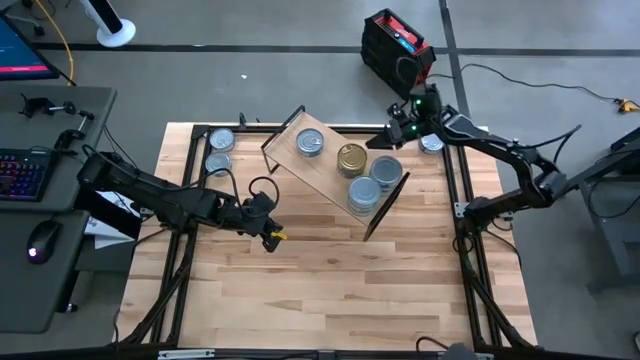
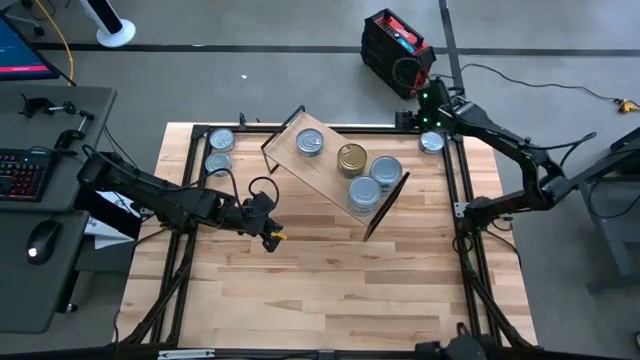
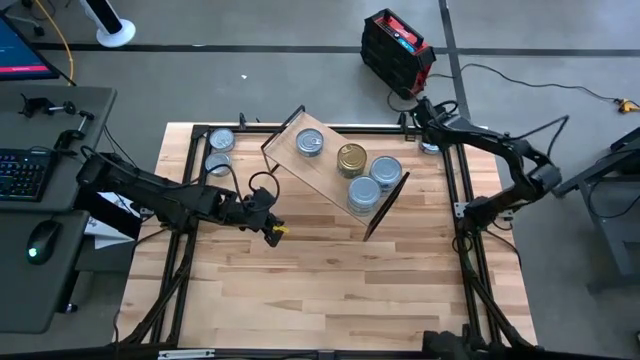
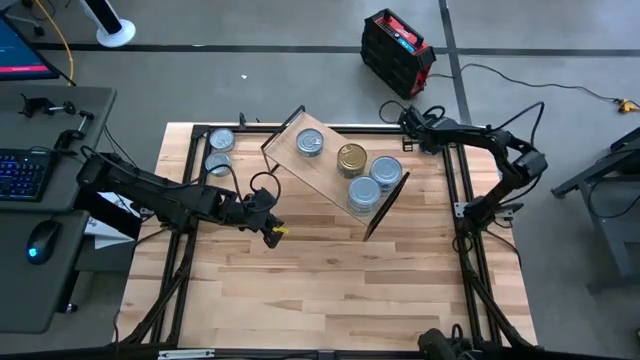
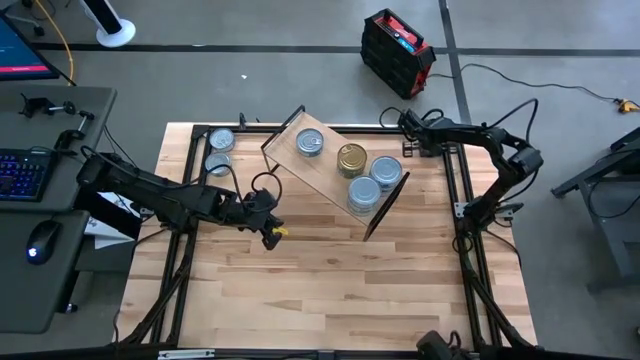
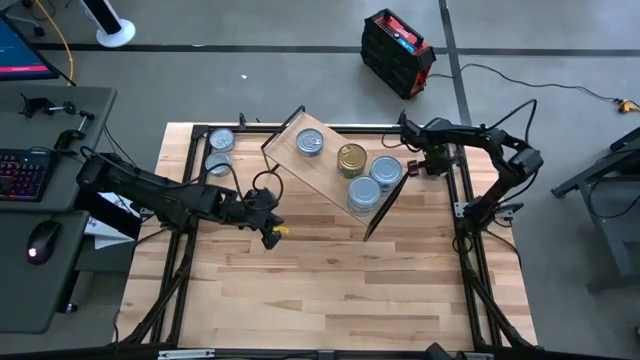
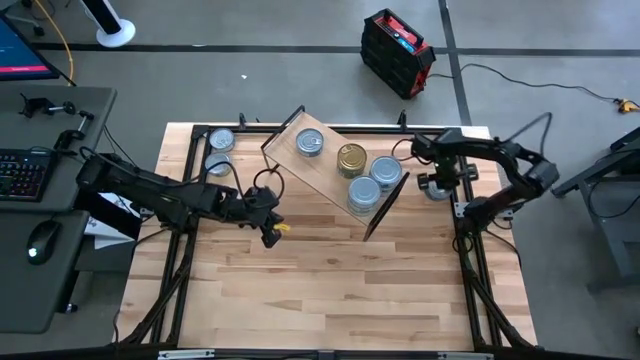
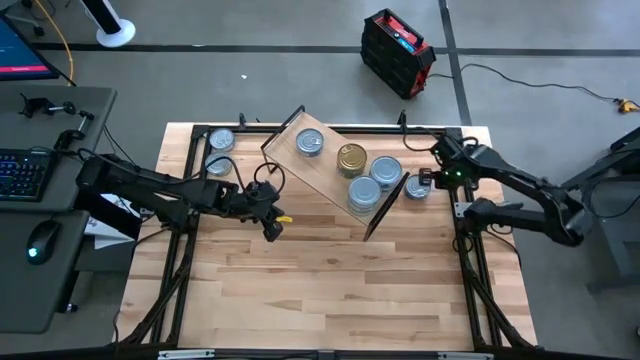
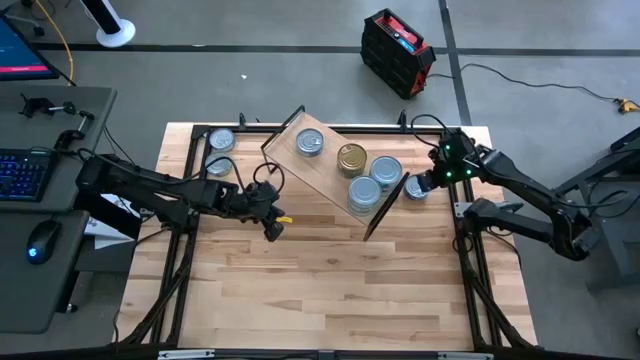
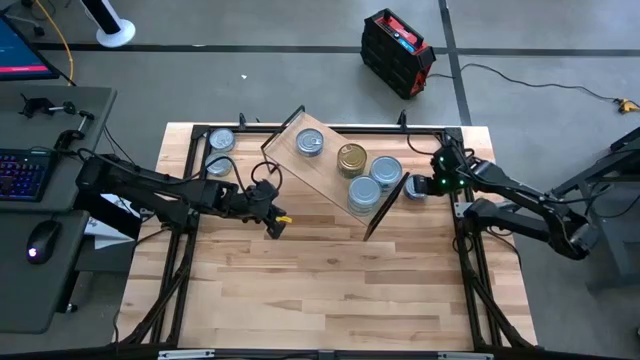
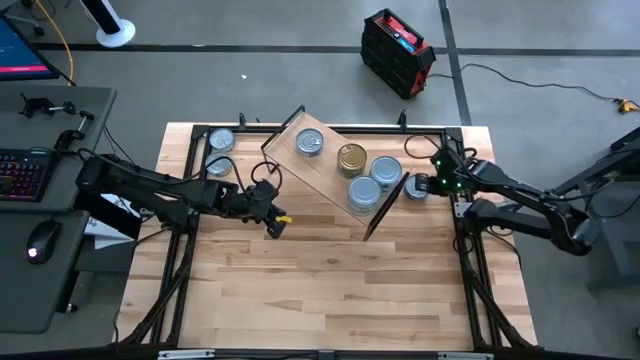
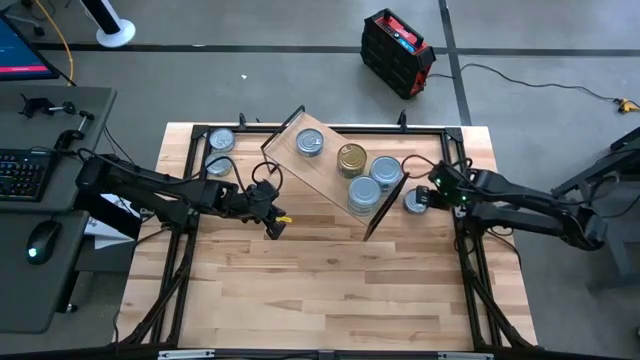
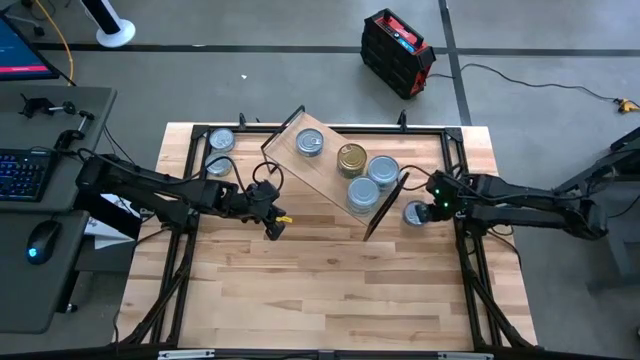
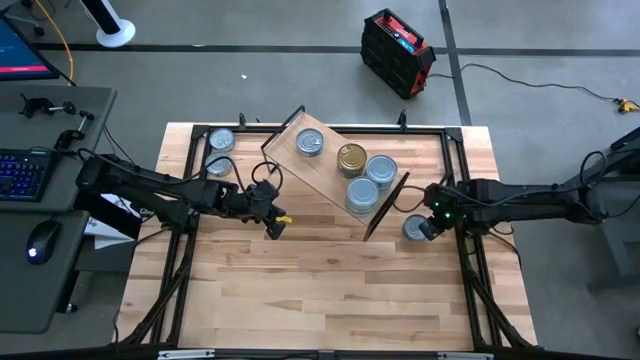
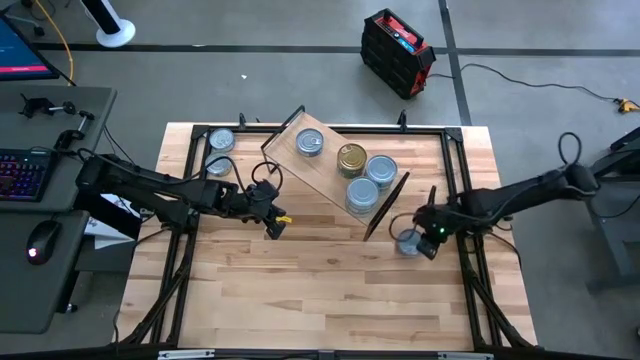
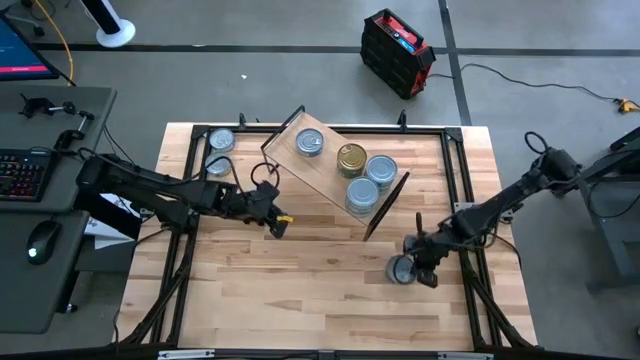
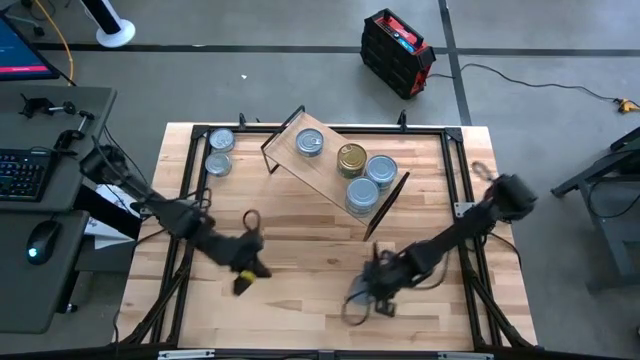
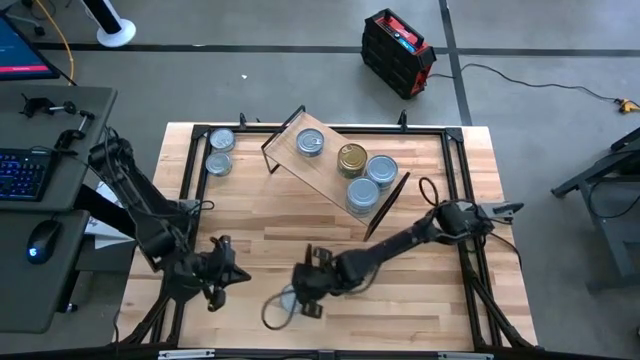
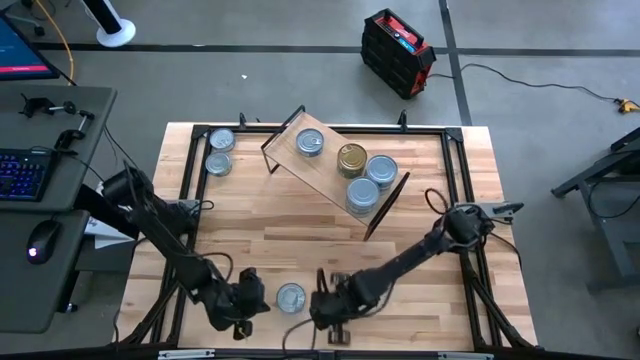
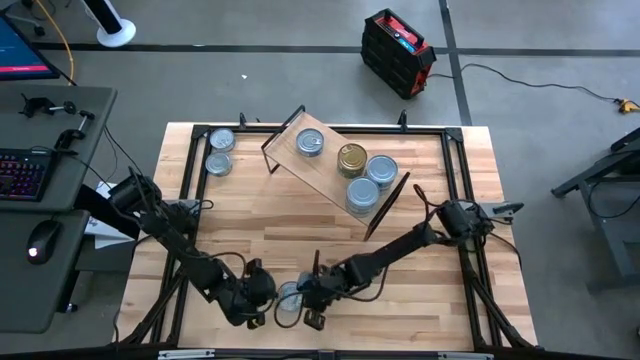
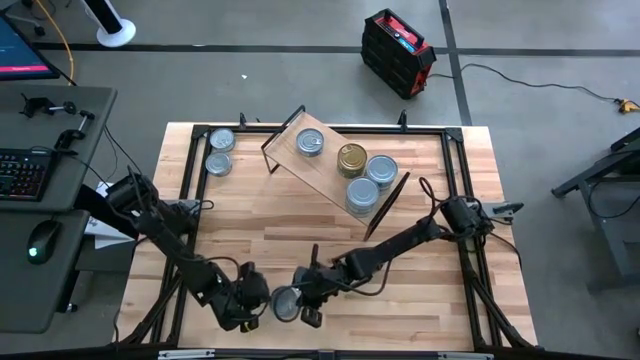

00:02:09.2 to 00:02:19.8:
Task: Stack canned seafood by type on shelf
Stack the blue tuna can on top of the other blue tuna can on the shelf

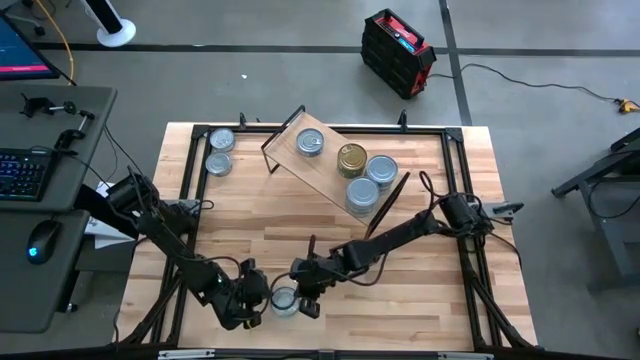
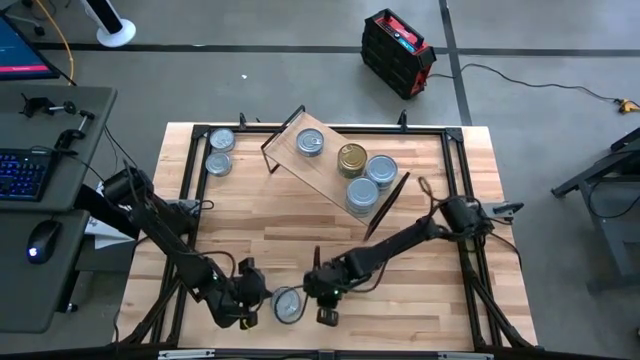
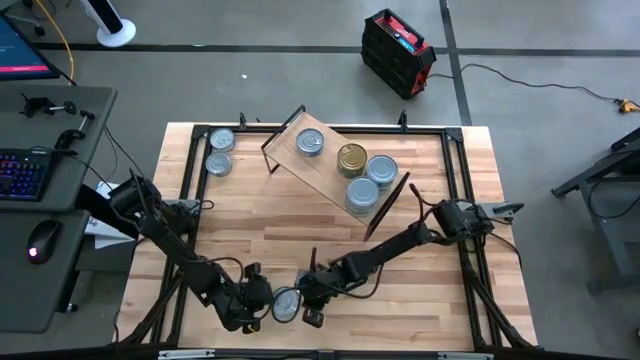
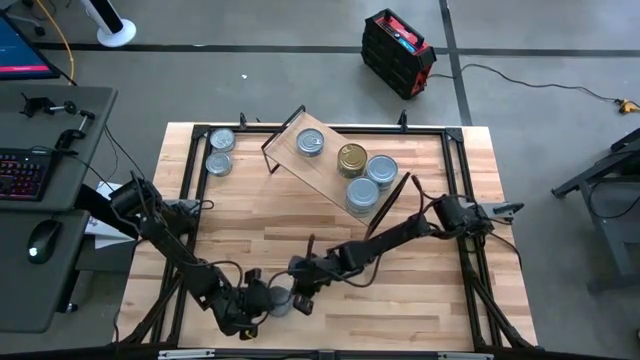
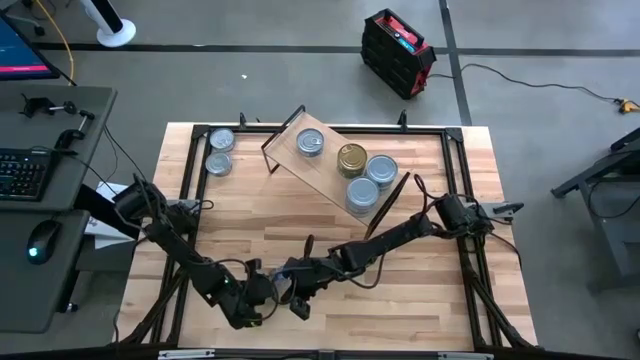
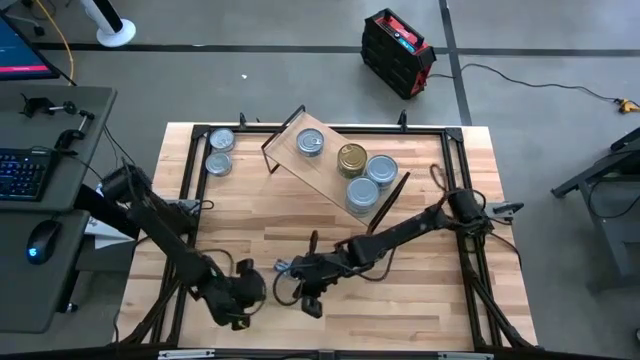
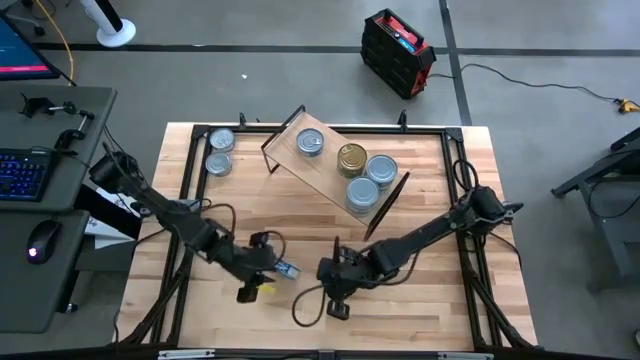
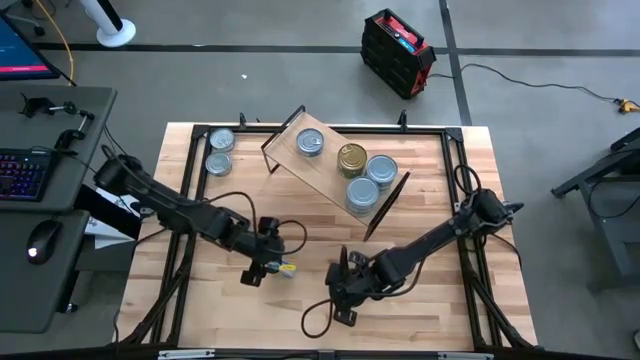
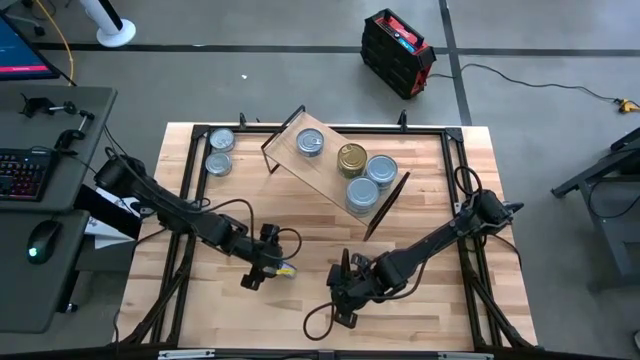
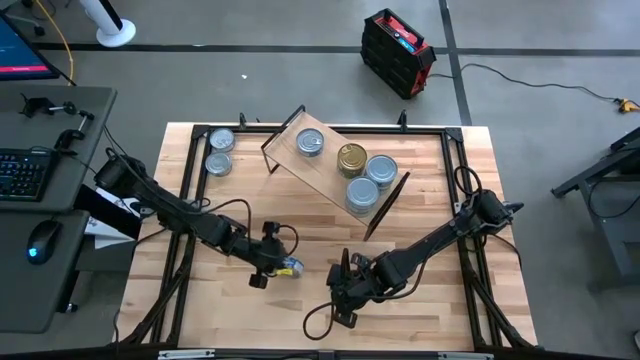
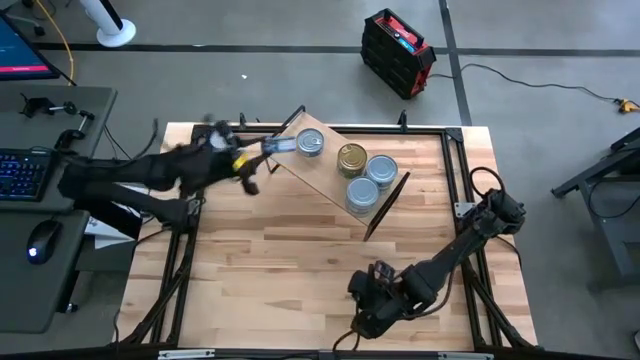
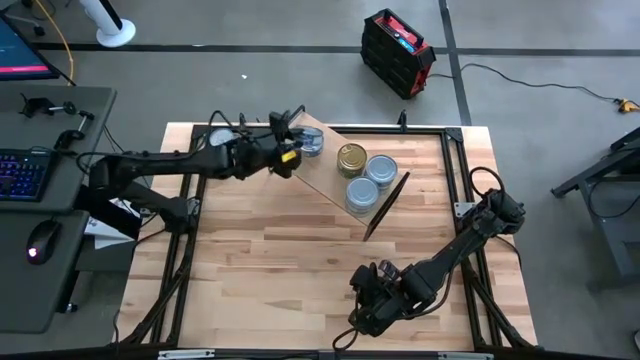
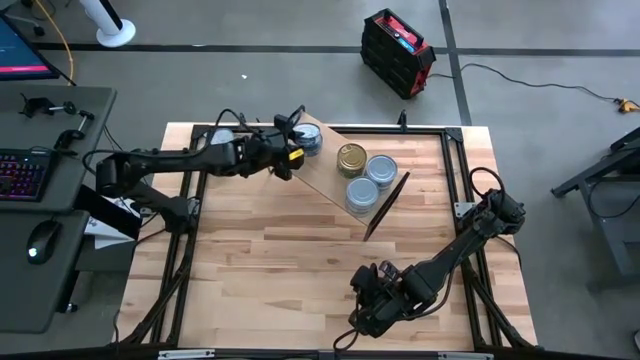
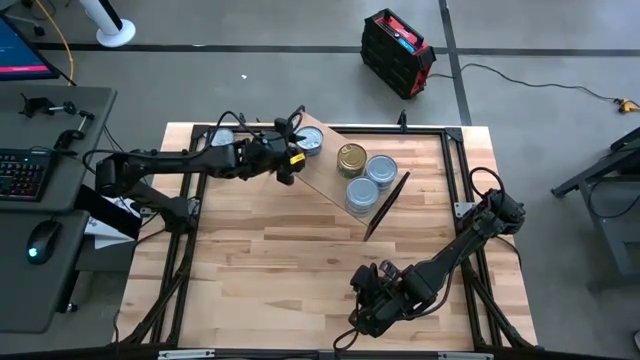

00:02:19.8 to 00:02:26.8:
Stack the blue tuna can on top of the other blue tuna can on the shelf

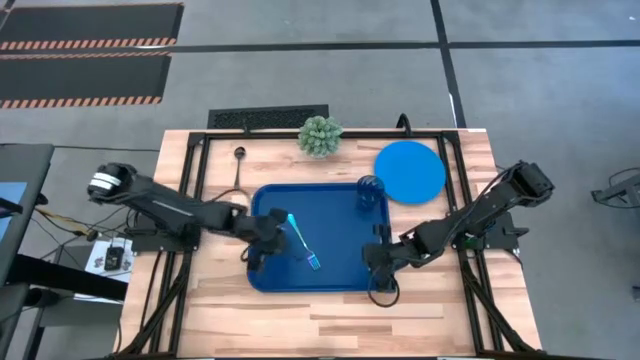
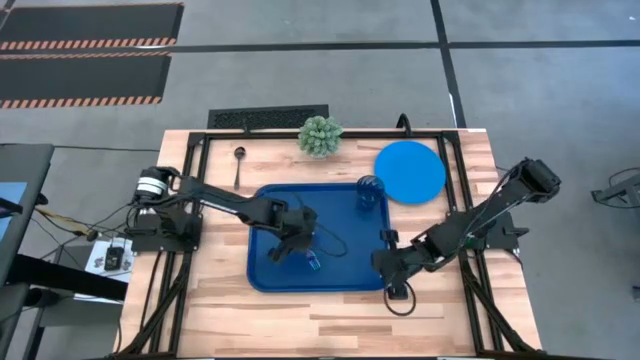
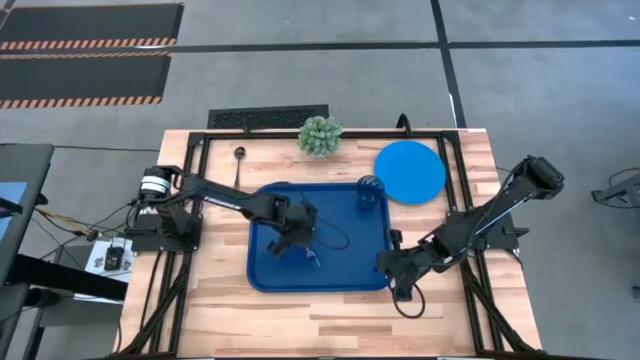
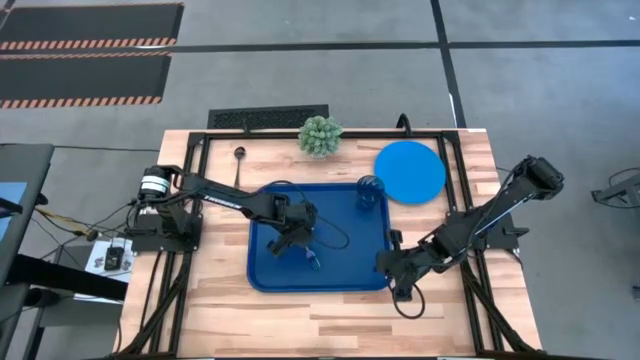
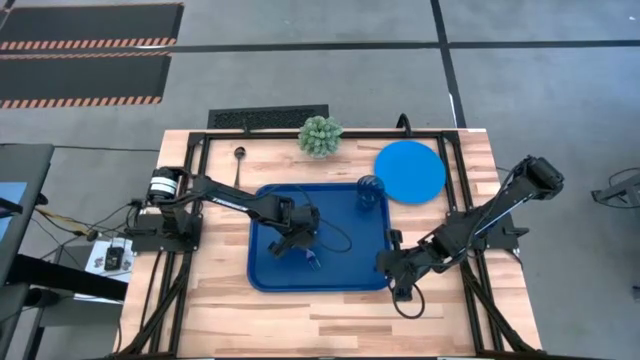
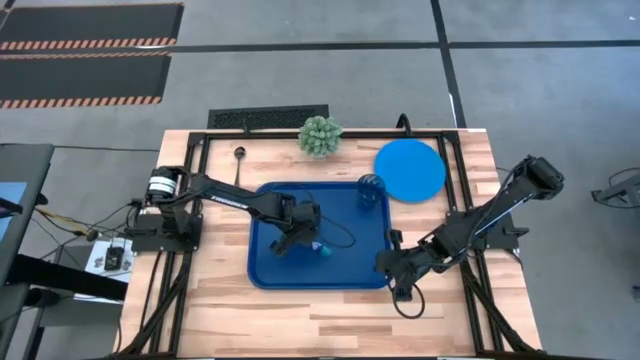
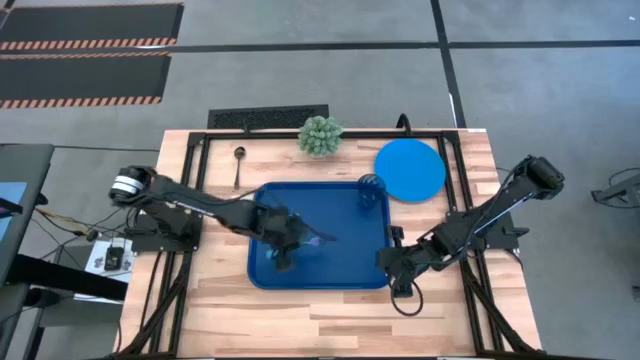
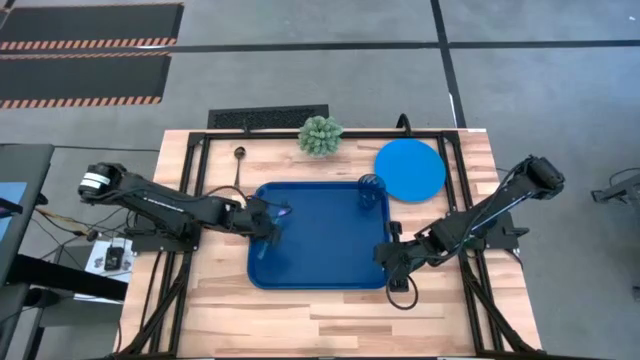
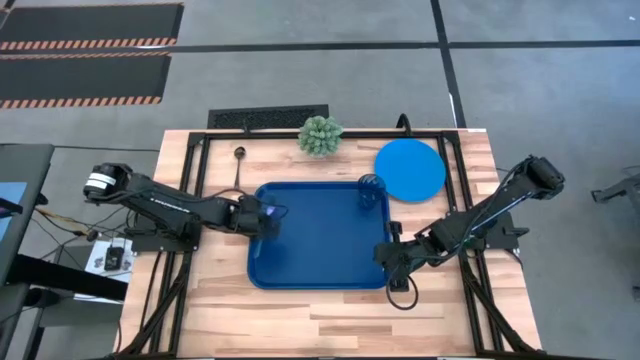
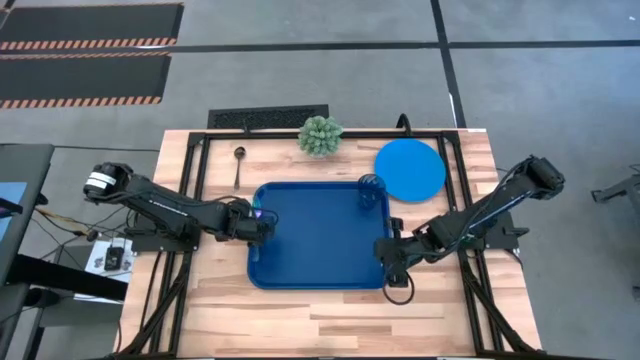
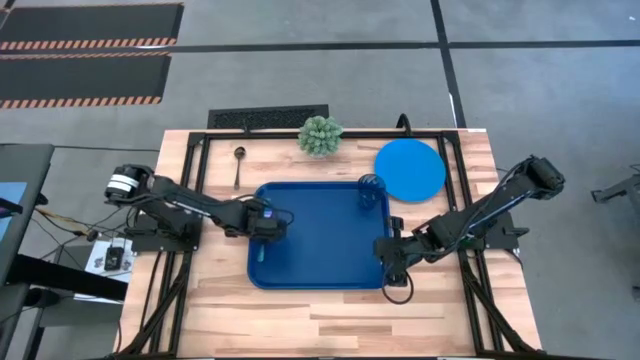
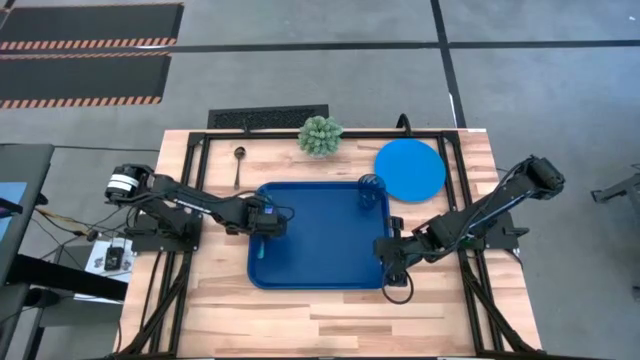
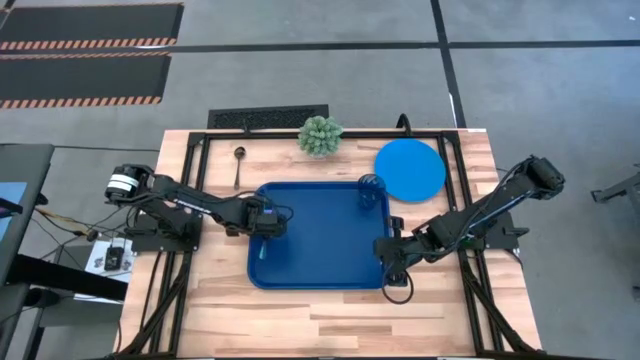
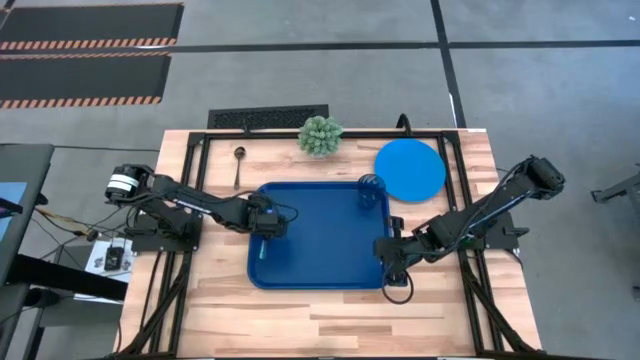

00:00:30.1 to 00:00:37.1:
Task: Pick and place plate/cup/fork/spoon on tray
Move the fork to the left side of the blue serving tray
